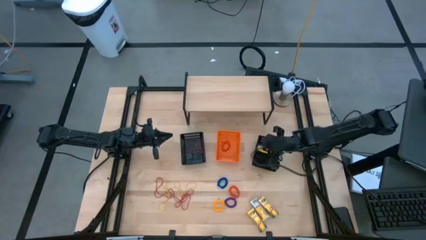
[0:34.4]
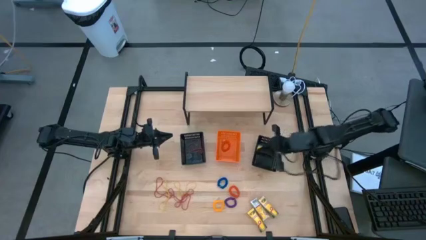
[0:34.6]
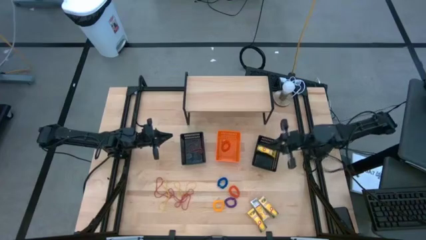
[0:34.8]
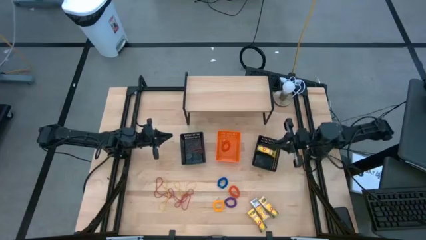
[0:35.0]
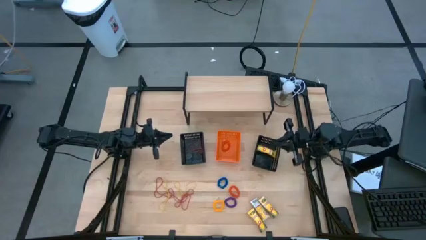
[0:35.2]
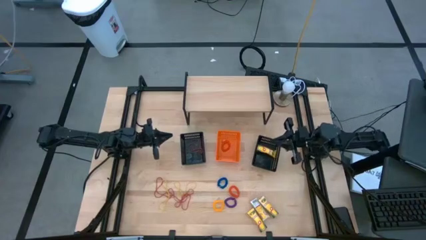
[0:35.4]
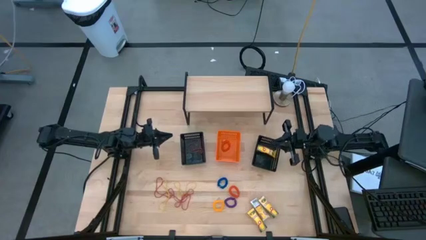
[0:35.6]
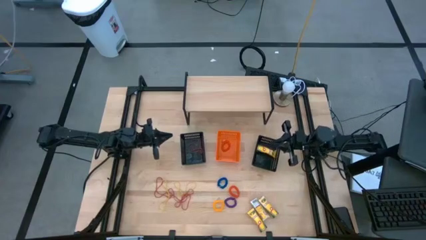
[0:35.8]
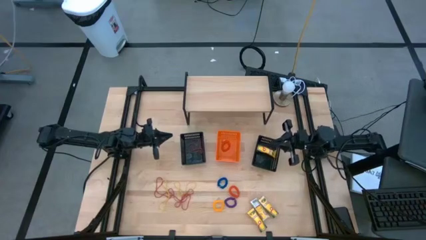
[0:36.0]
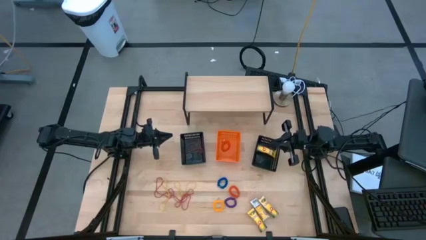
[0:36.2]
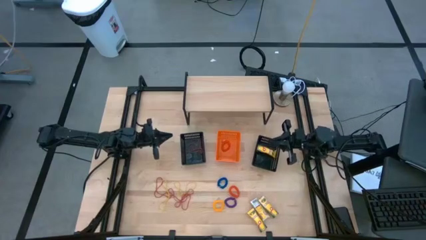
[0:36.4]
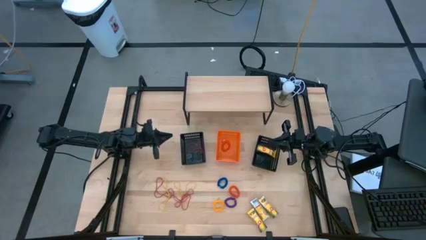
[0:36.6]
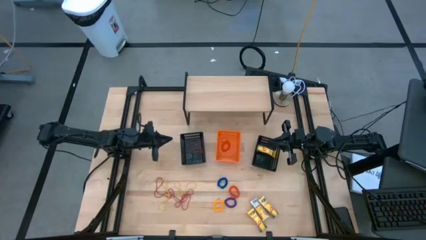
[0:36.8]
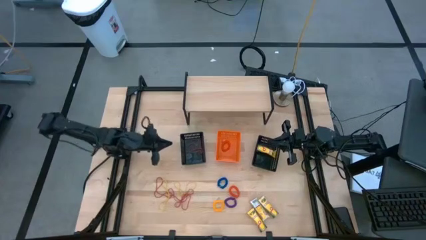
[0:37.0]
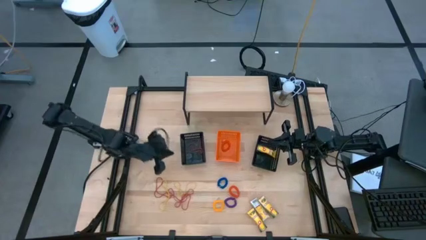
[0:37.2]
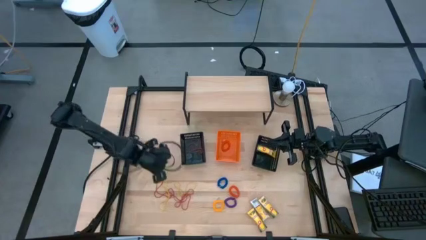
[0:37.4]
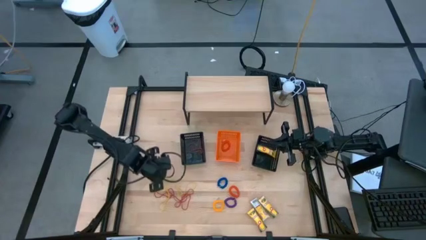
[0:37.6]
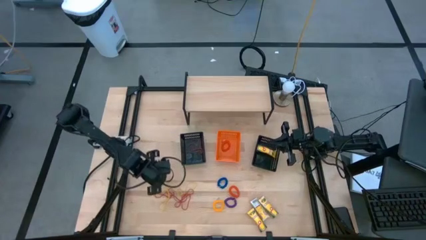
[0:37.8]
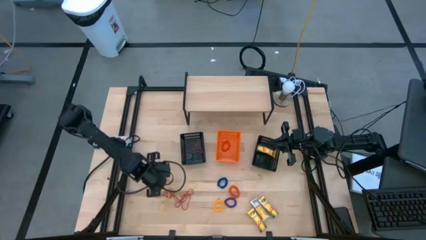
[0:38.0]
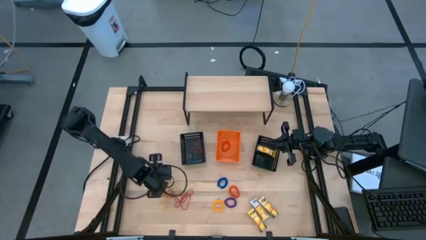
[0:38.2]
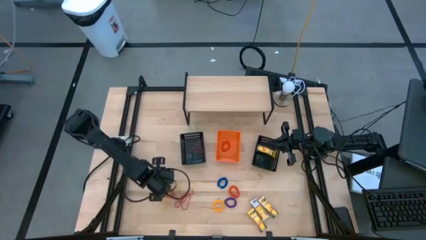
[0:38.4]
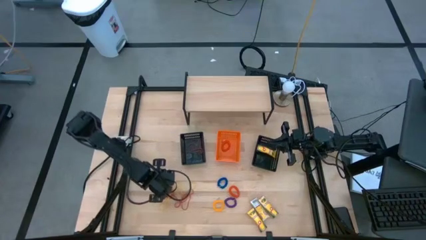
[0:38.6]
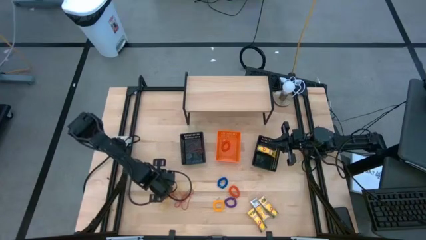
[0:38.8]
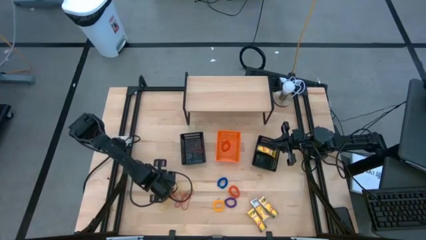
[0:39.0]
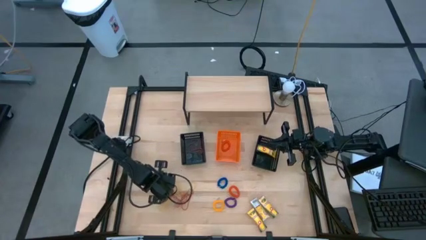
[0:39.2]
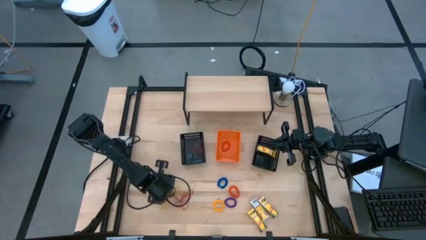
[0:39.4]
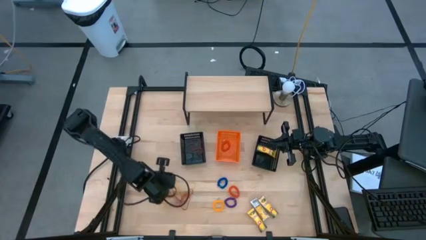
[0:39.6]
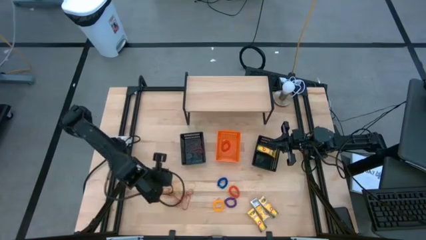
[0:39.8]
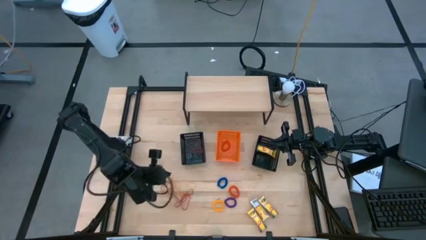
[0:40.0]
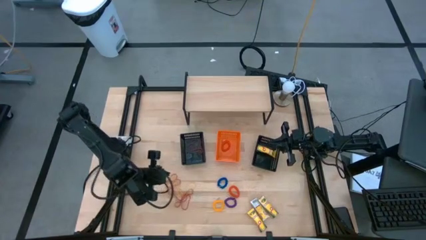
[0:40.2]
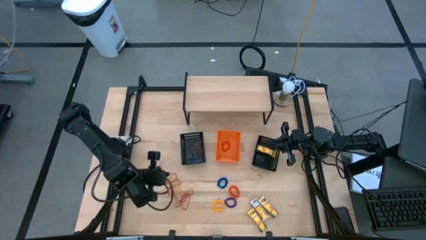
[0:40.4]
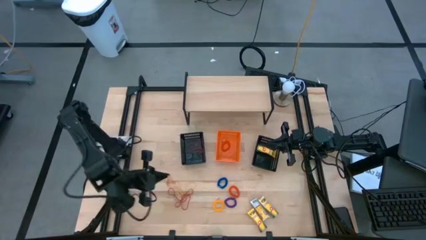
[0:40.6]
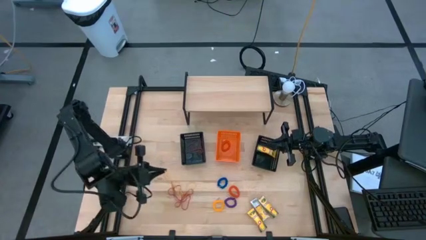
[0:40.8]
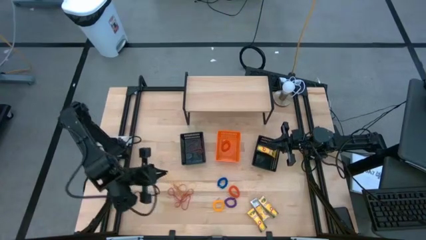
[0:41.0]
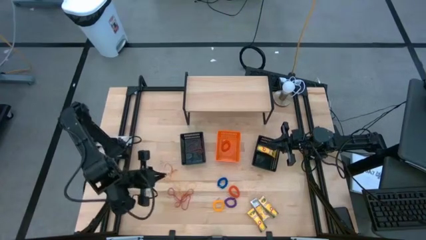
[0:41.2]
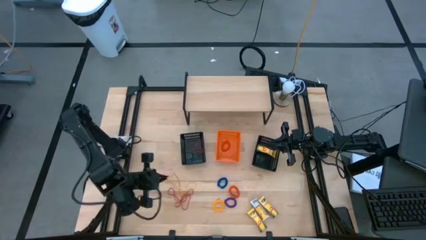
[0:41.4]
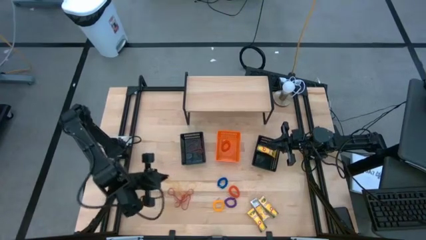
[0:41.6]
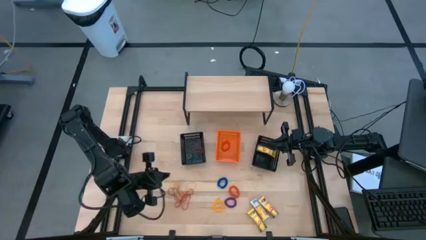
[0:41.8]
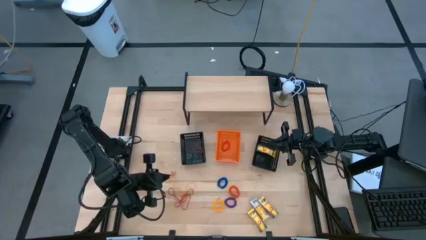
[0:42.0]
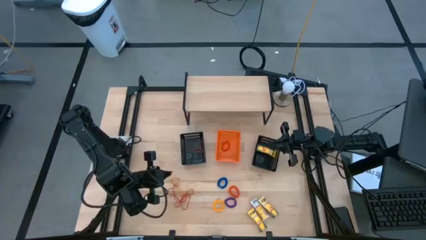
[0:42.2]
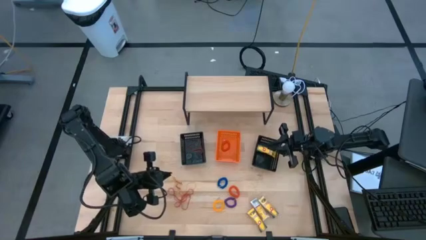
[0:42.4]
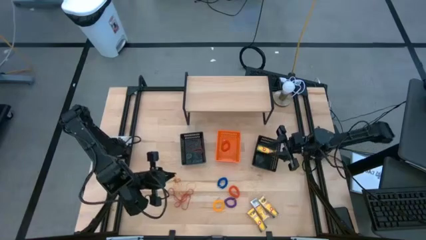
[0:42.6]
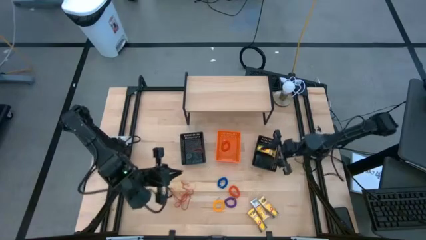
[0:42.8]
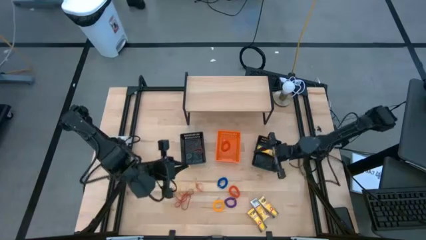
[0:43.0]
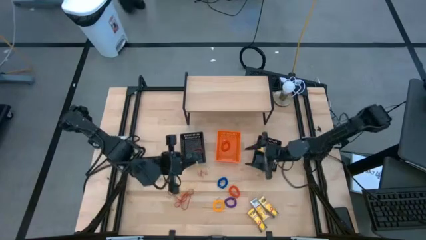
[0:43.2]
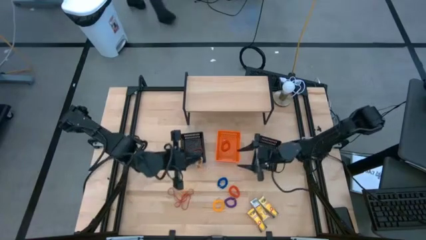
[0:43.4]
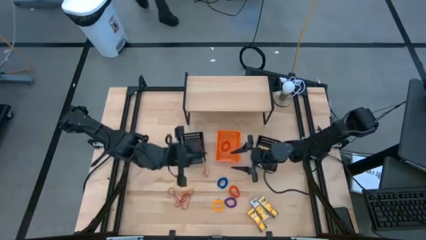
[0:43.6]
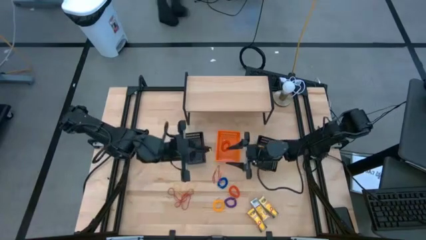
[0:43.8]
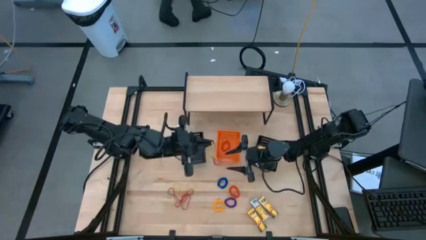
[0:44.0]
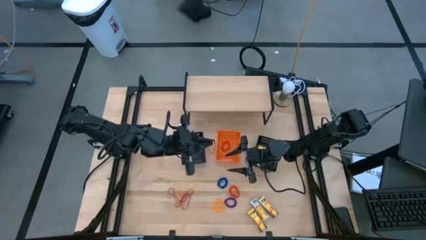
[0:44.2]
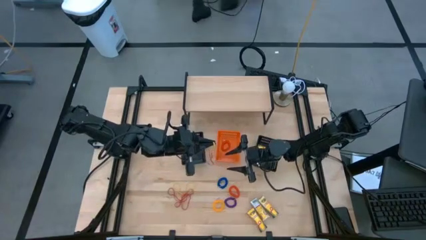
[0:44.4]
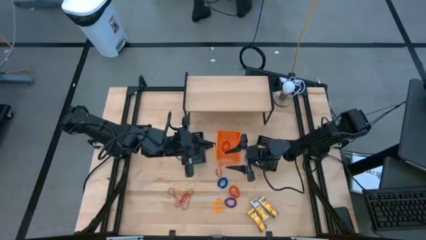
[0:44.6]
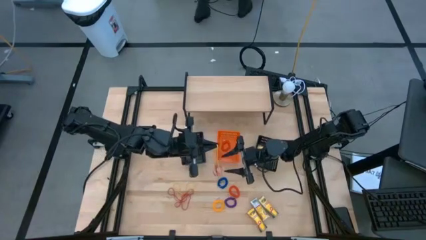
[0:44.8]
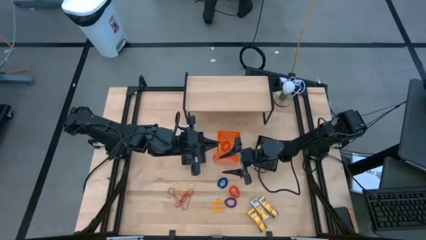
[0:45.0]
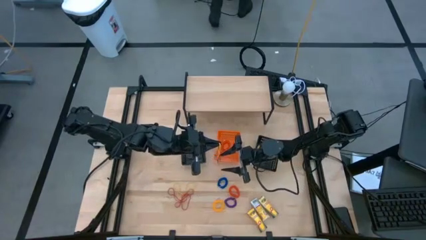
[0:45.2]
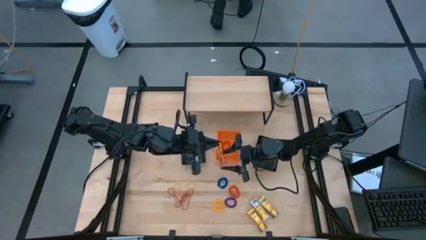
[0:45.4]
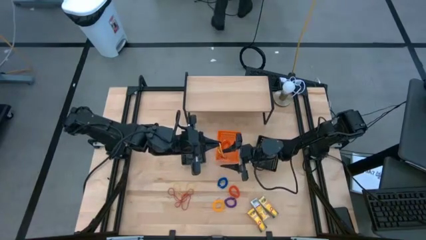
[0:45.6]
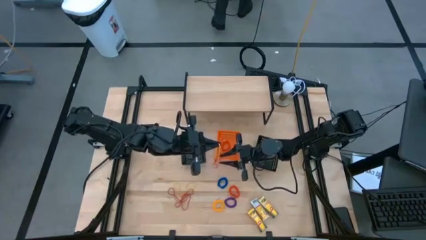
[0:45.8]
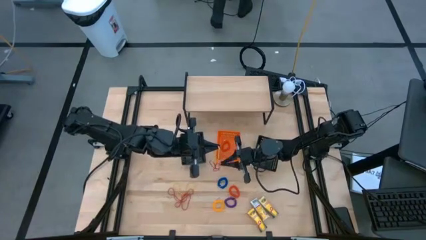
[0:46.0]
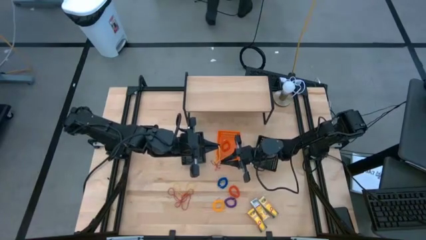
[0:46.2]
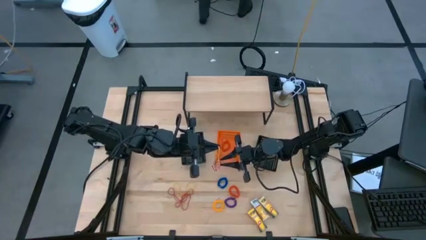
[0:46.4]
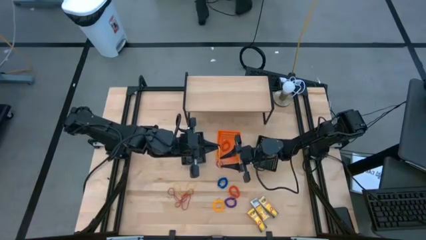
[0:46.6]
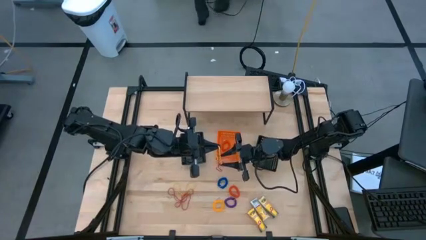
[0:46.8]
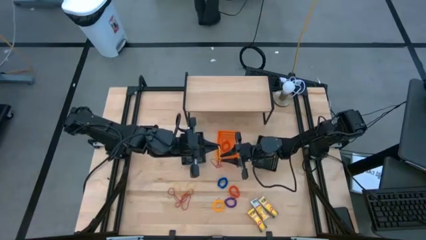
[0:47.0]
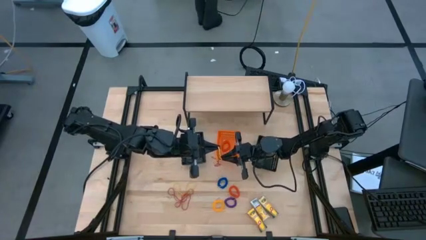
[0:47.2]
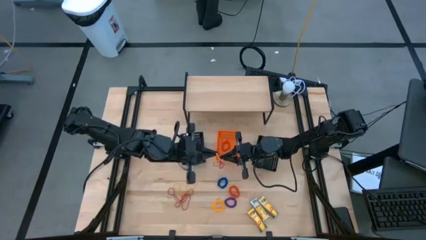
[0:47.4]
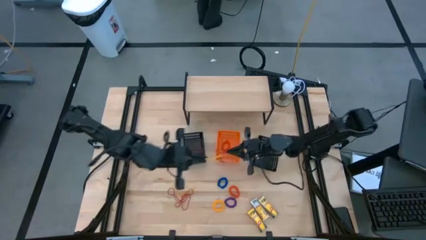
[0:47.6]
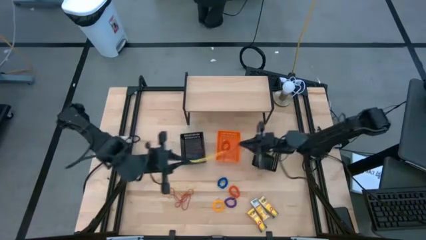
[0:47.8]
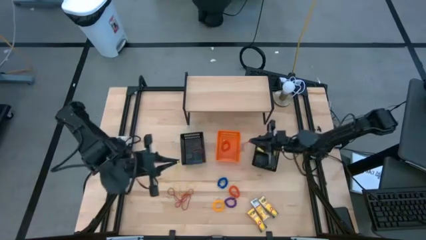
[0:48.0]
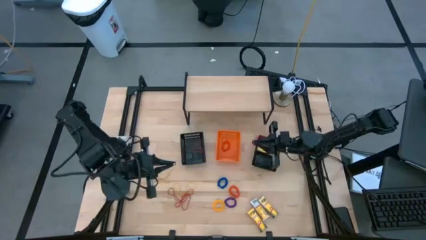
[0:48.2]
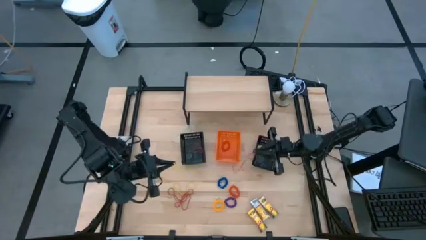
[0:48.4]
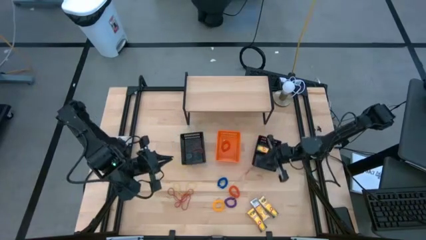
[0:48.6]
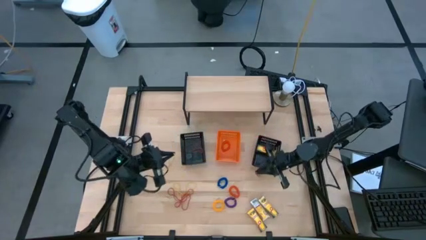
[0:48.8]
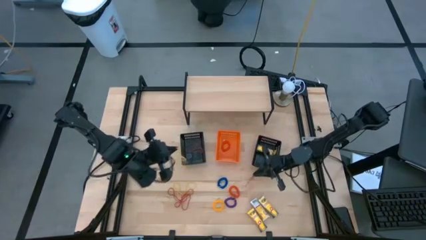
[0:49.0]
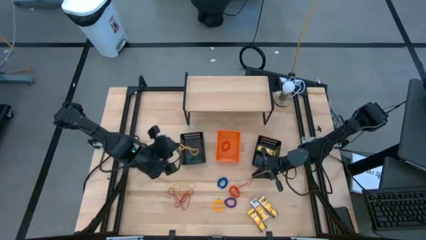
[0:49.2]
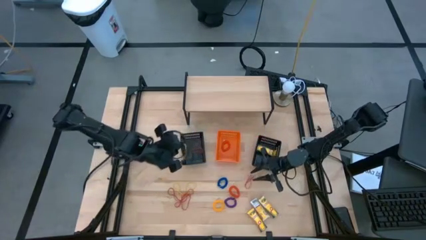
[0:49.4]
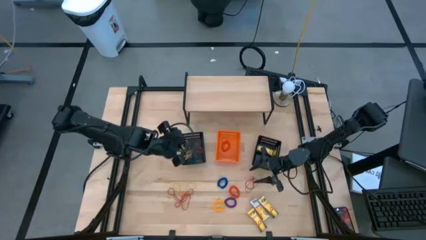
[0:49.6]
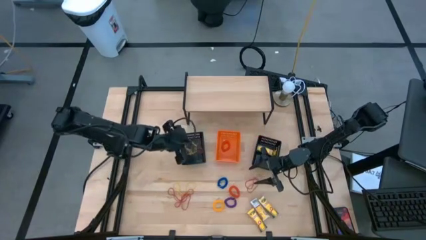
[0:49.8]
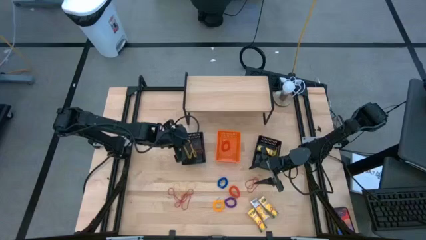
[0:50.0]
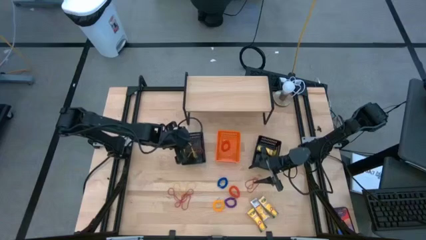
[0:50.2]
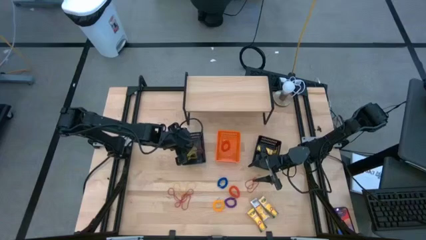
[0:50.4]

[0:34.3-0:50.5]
Task: Pick & Place Office Desk Supplies
Put the yellow rubber band into the left black bin
